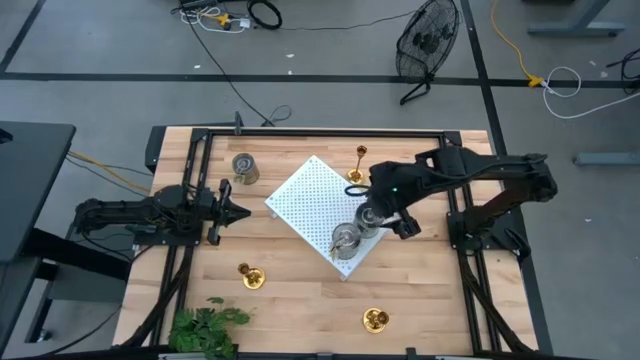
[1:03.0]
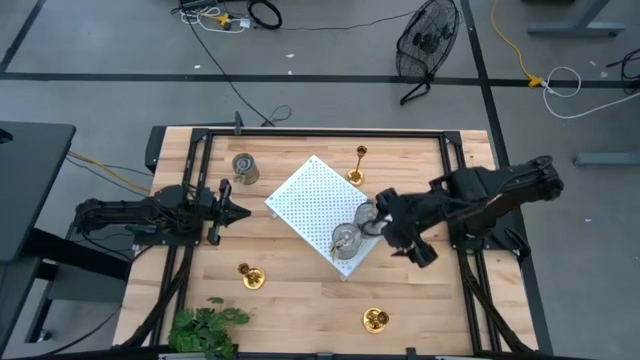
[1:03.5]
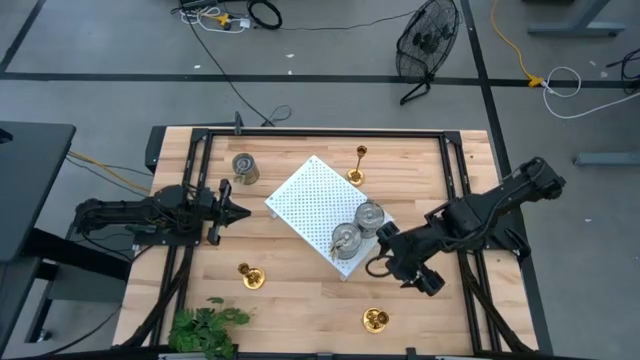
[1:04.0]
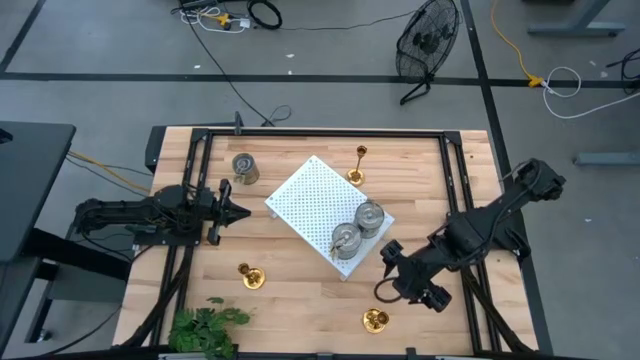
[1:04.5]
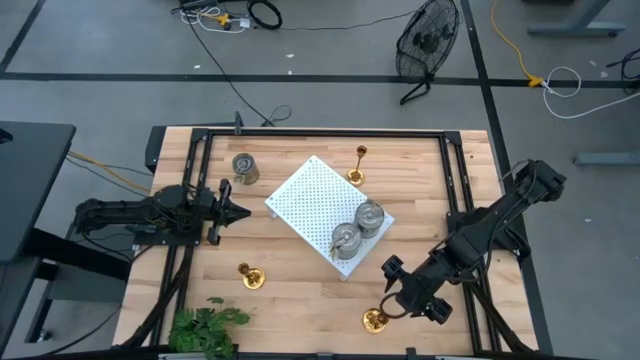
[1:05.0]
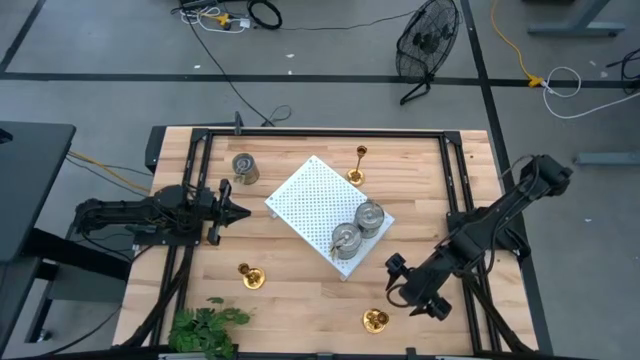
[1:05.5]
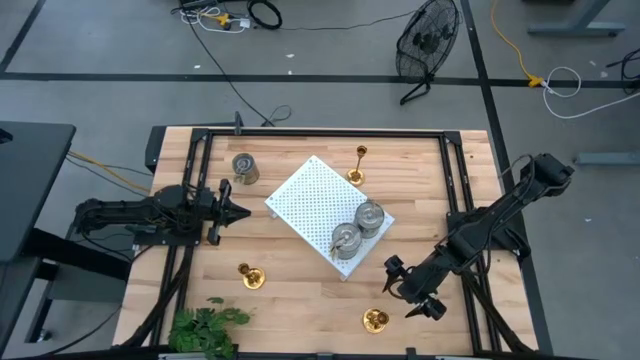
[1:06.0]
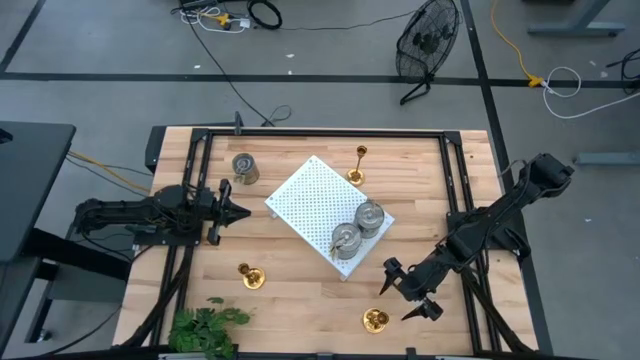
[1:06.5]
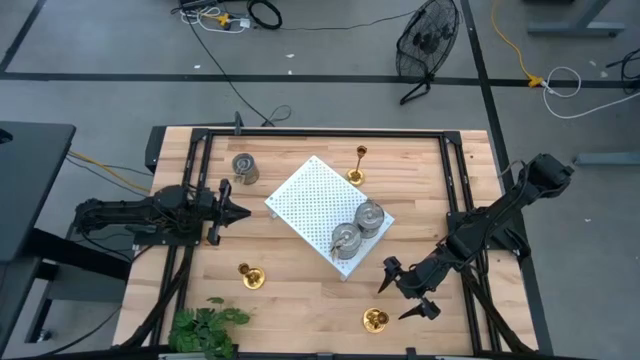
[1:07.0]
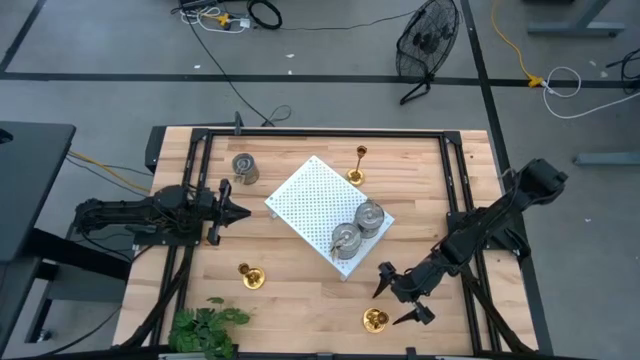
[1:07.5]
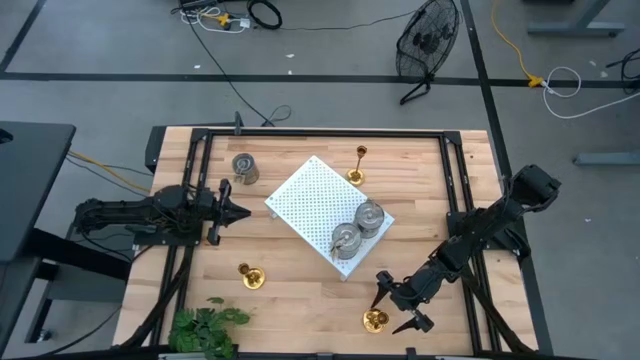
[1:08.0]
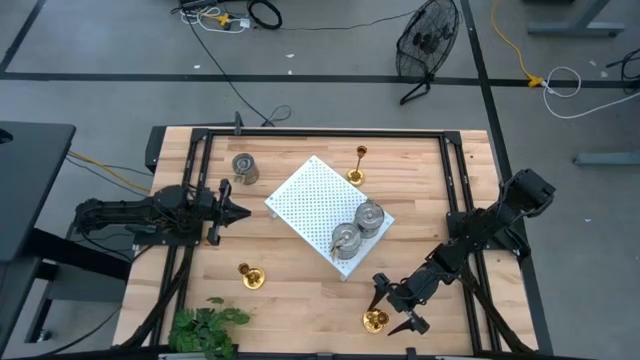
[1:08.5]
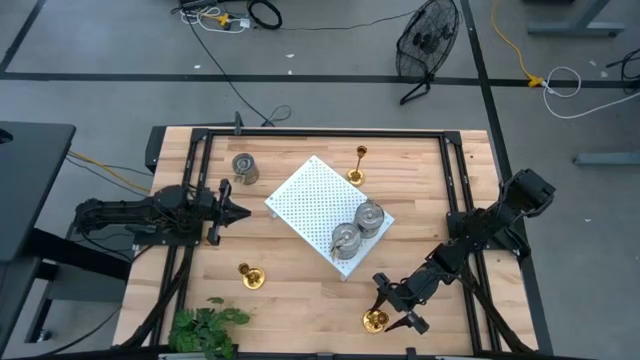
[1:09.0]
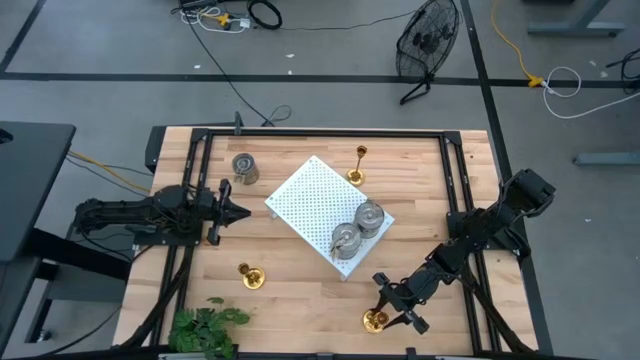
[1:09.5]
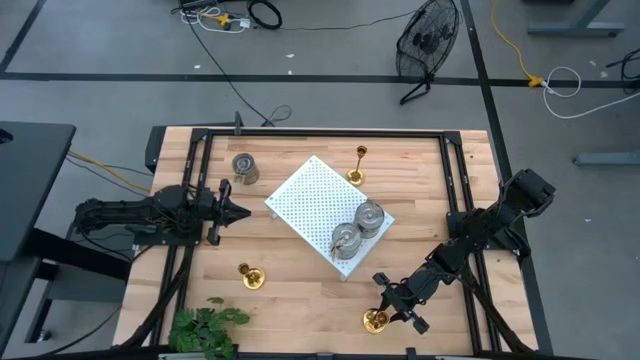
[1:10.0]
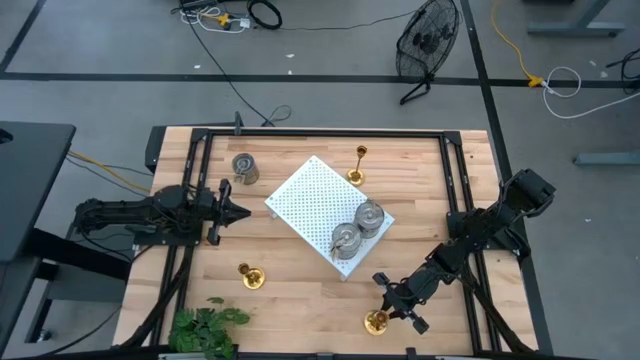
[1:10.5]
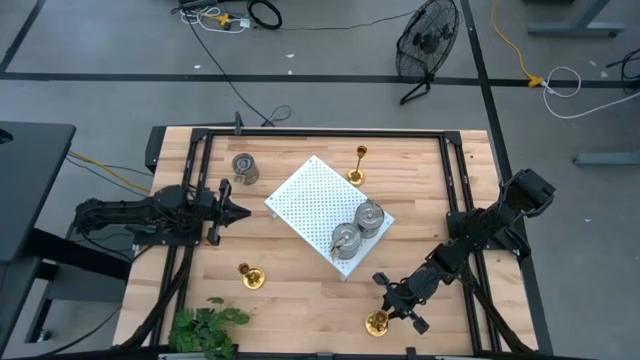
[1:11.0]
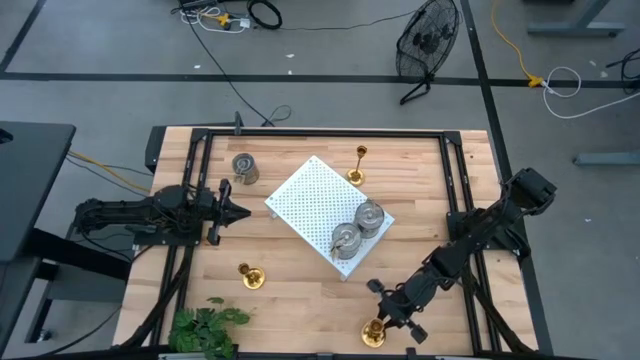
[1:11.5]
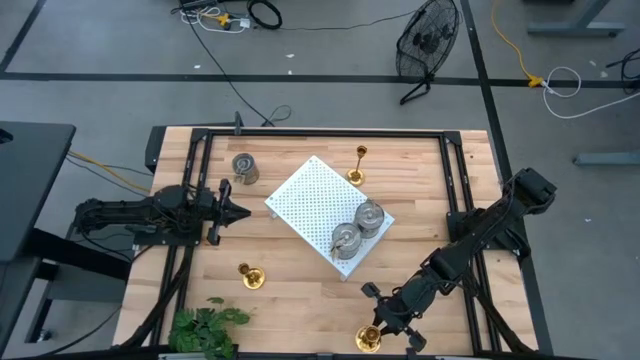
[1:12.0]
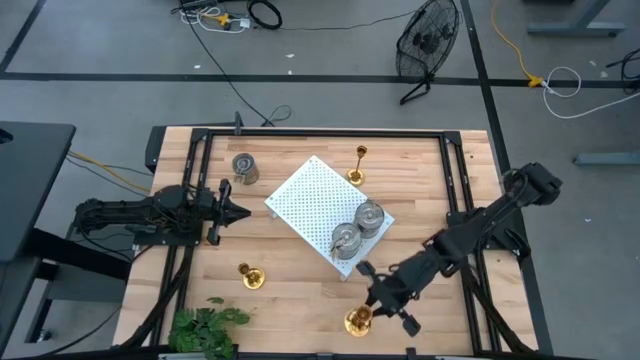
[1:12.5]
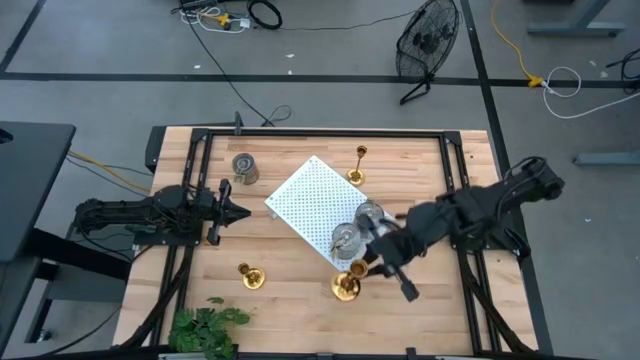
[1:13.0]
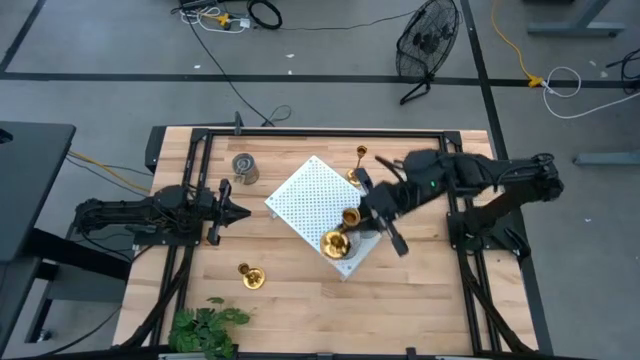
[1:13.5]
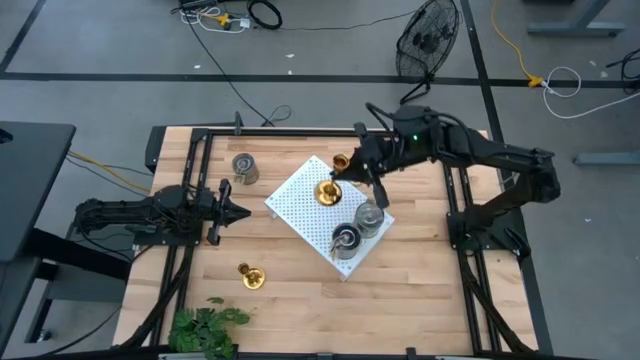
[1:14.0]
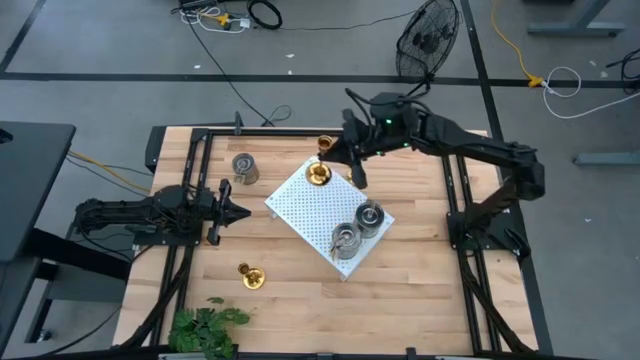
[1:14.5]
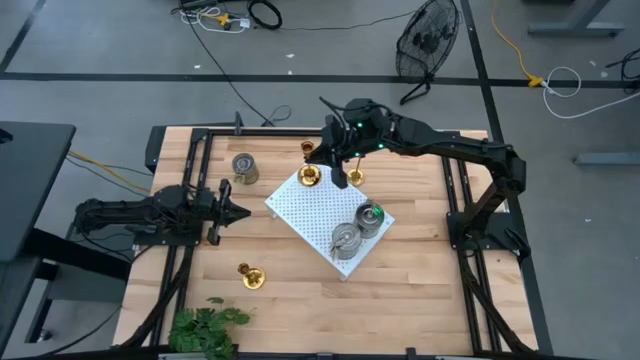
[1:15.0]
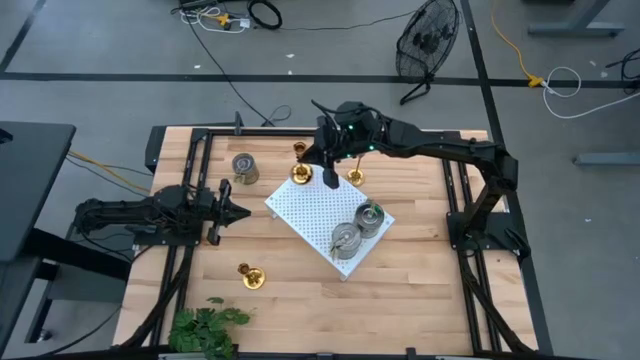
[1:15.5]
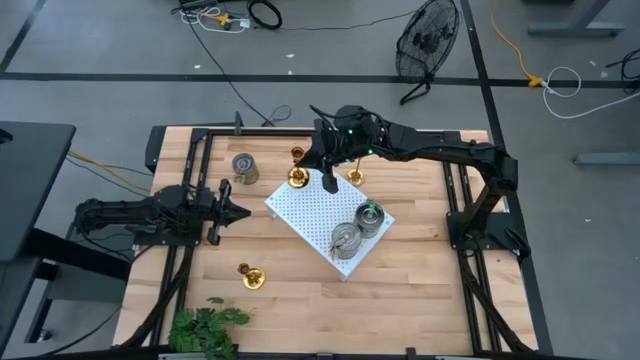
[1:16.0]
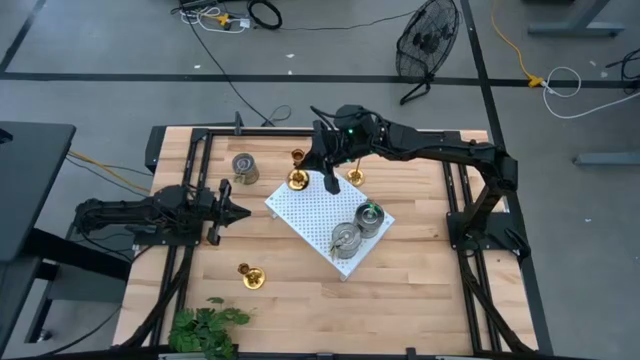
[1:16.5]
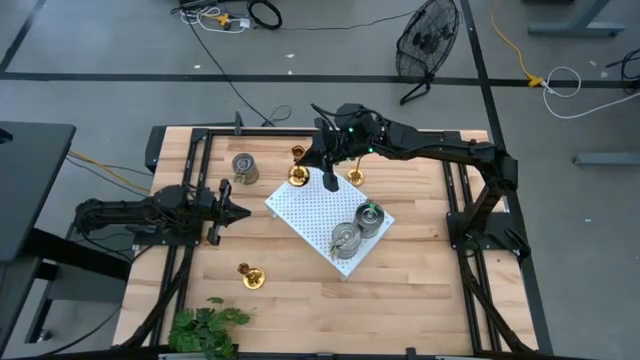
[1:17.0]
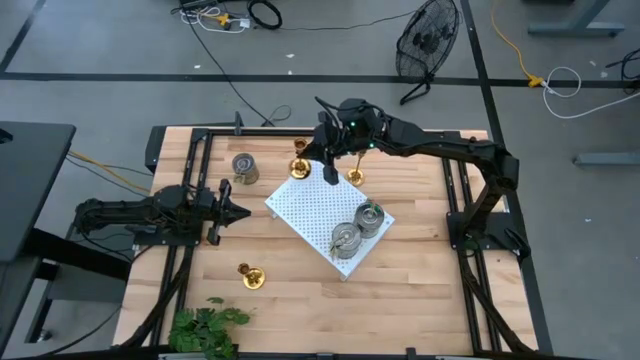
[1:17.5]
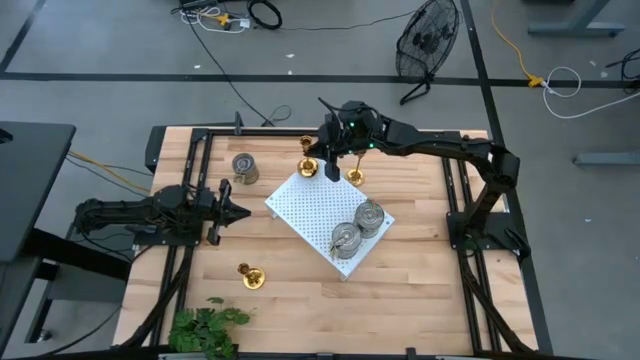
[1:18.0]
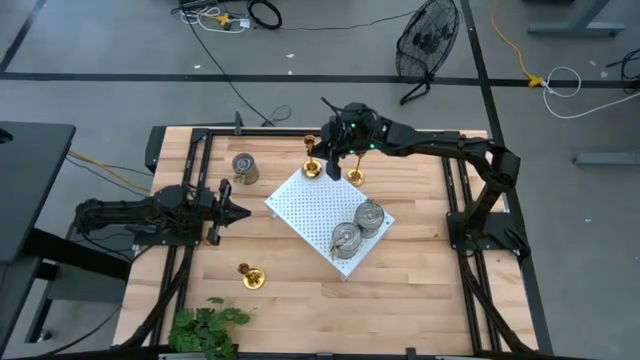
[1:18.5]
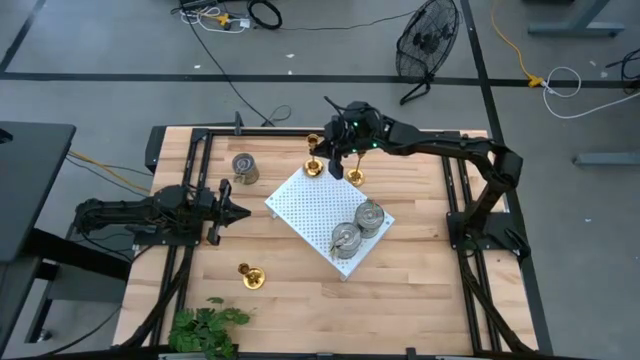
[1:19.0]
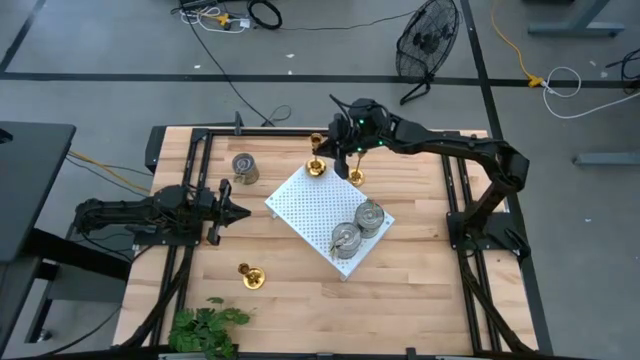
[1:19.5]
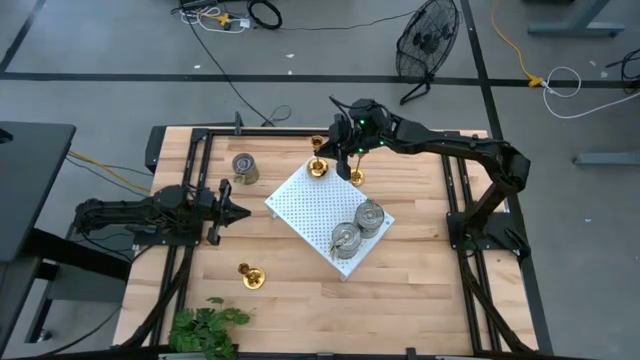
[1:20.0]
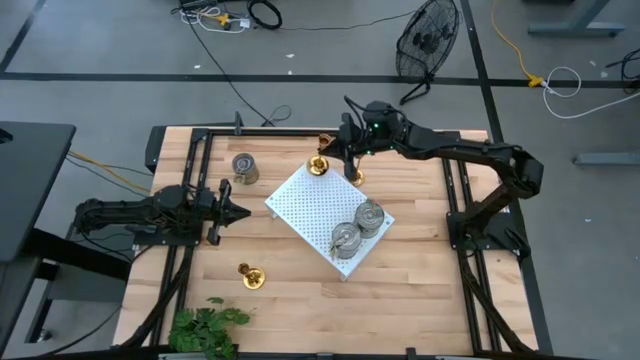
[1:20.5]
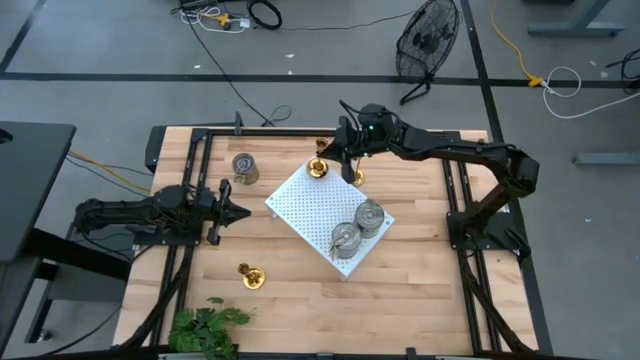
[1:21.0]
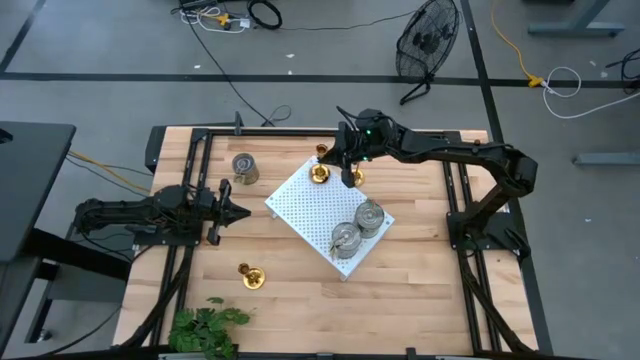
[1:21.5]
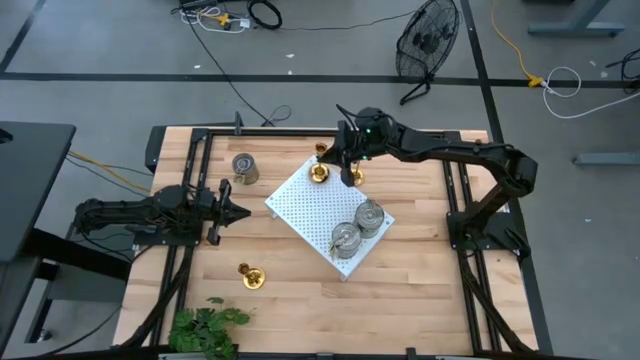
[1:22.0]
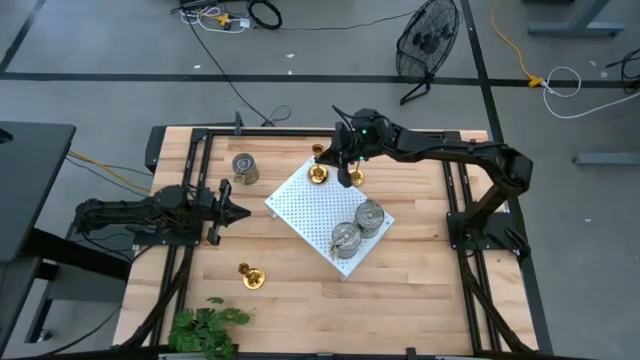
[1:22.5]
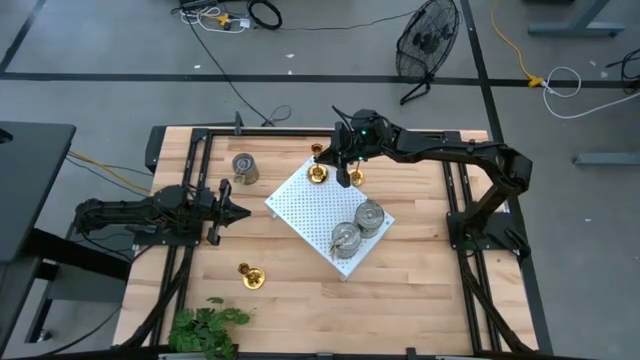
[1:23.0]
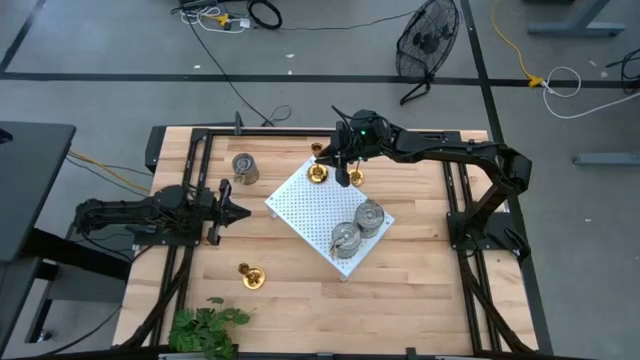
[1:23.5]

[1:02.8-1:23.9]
Task: Pick & Place candle stick holders
Put the bottom right gold candle holder on the shelf

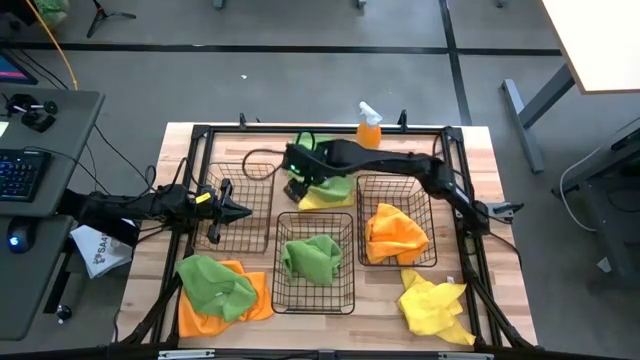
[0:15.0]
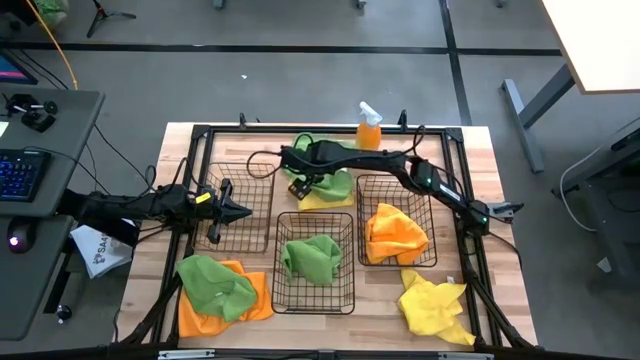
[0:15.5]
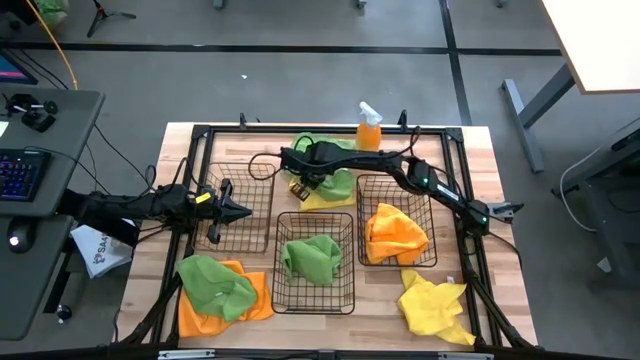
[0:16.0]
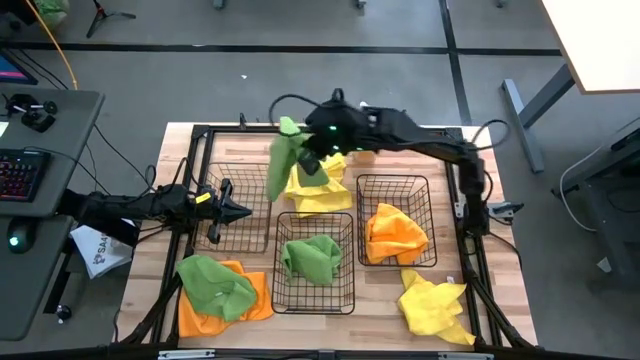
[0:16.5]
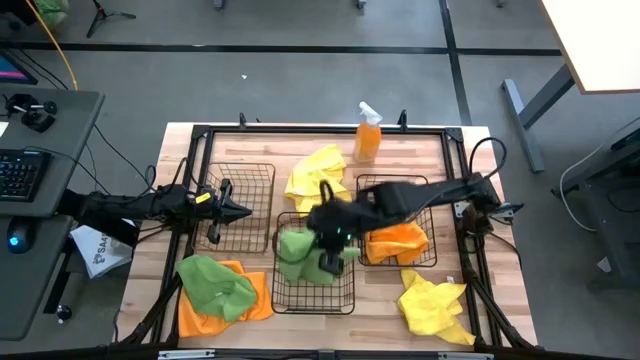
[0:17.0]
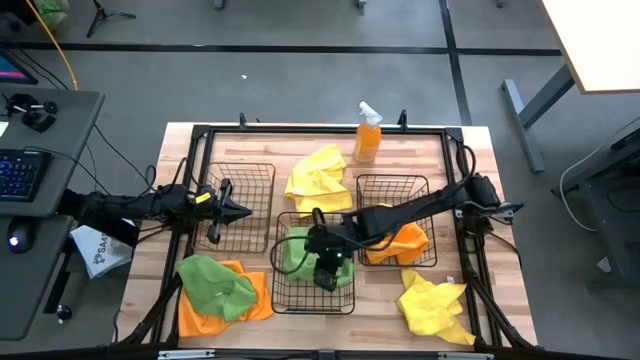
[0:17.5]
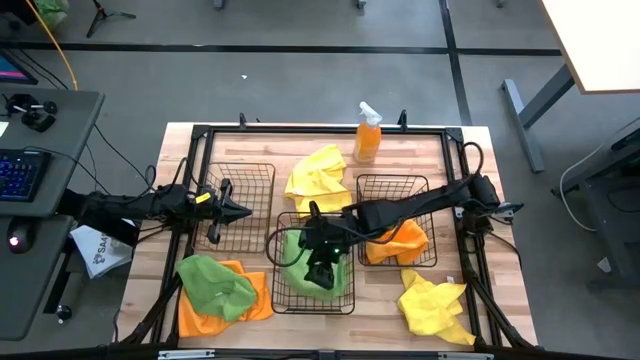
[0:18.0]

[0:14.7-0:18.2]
Task: Sort microfiber towel by color & place in baskets
Put the top green towel into the middle wire basket
